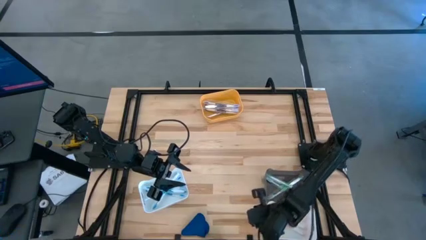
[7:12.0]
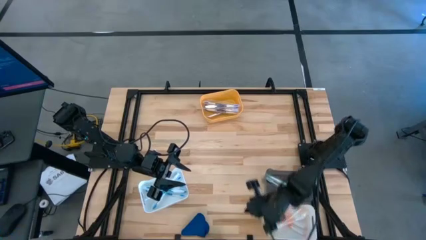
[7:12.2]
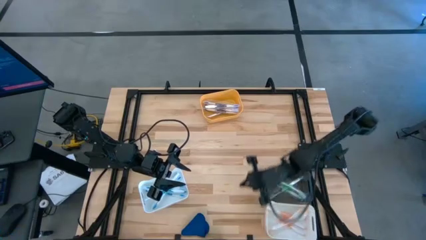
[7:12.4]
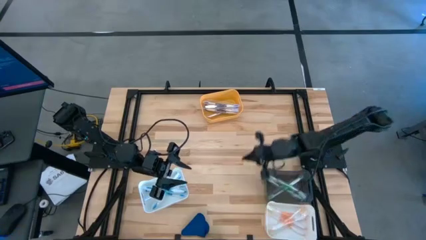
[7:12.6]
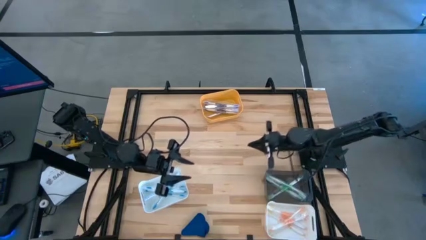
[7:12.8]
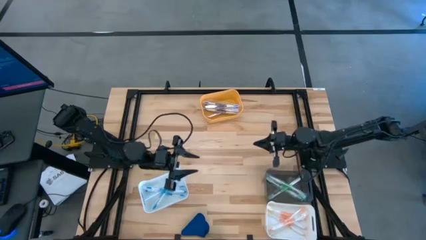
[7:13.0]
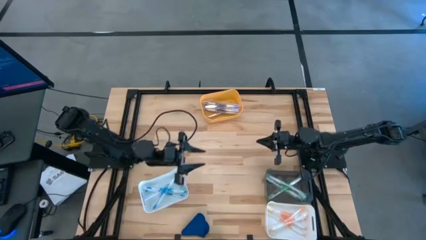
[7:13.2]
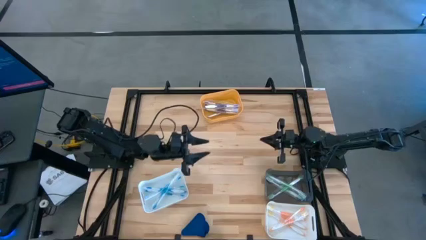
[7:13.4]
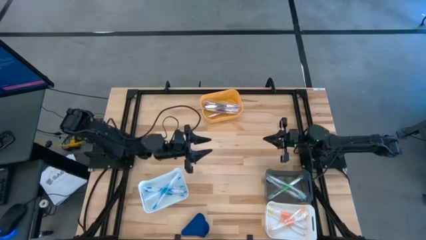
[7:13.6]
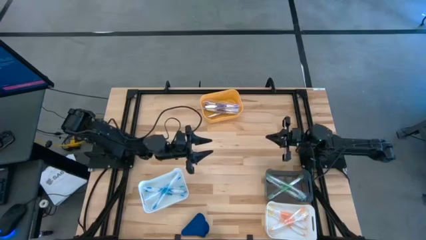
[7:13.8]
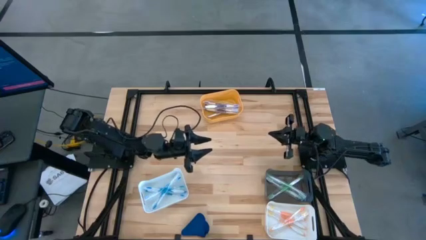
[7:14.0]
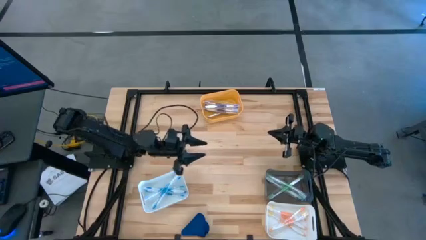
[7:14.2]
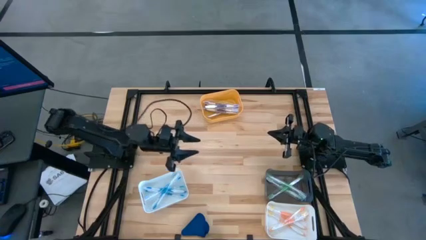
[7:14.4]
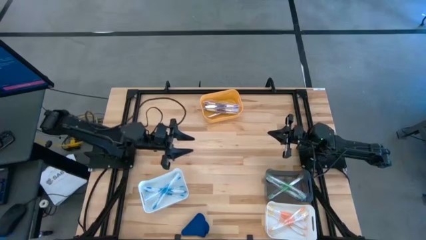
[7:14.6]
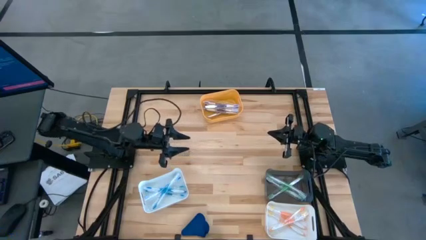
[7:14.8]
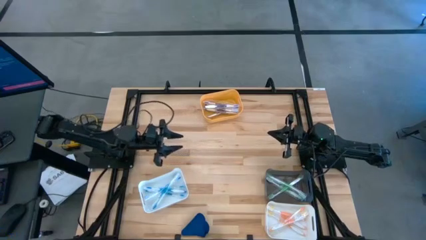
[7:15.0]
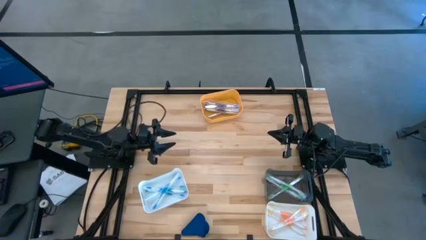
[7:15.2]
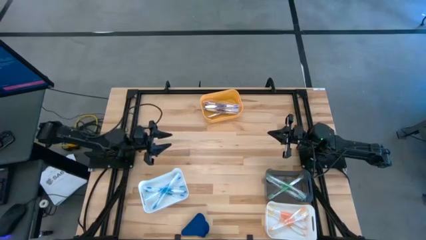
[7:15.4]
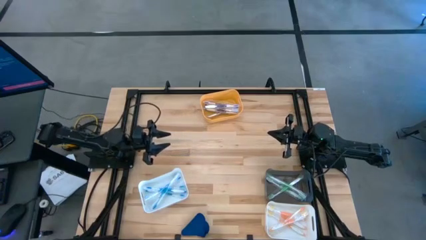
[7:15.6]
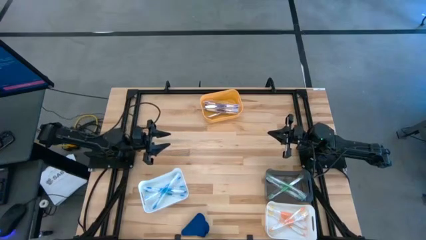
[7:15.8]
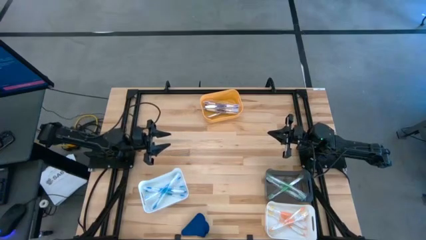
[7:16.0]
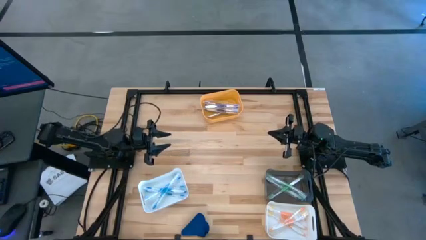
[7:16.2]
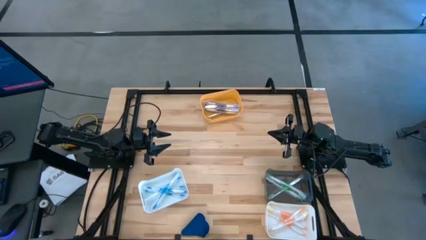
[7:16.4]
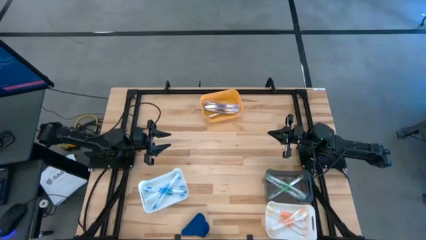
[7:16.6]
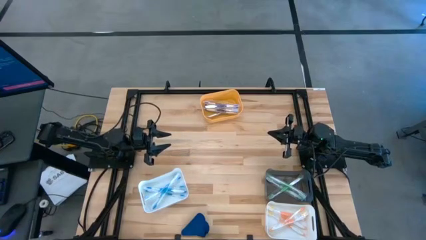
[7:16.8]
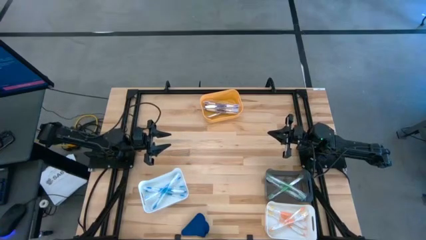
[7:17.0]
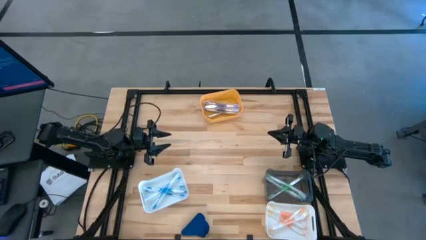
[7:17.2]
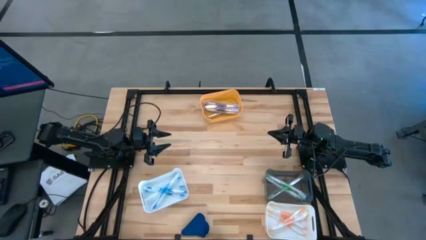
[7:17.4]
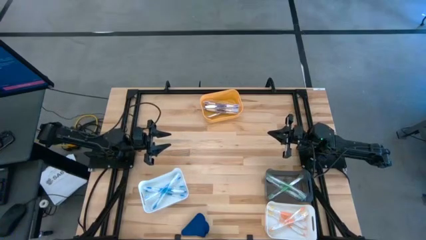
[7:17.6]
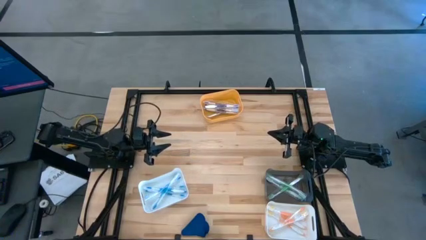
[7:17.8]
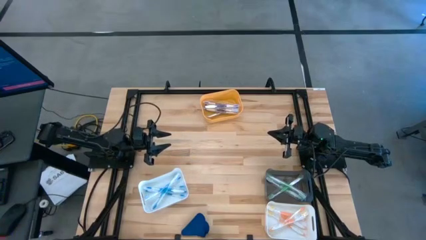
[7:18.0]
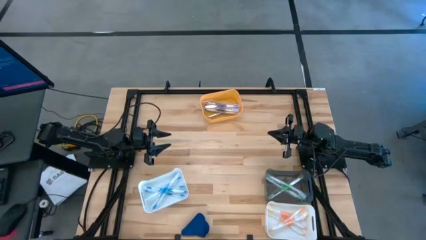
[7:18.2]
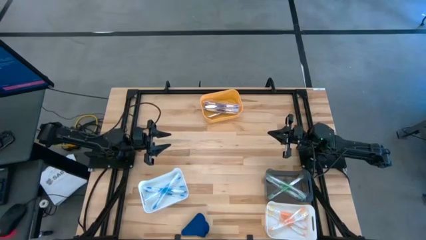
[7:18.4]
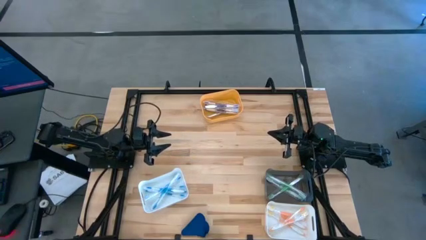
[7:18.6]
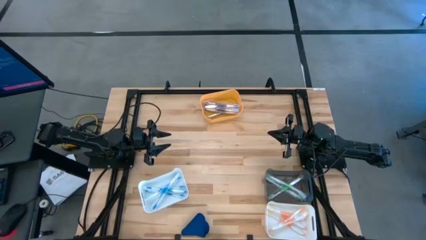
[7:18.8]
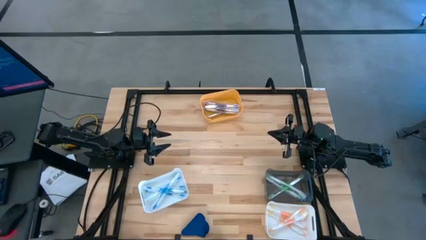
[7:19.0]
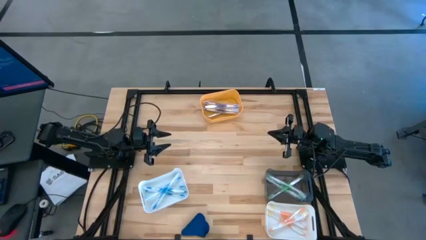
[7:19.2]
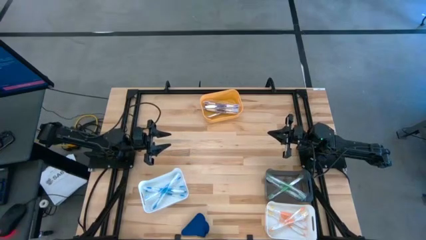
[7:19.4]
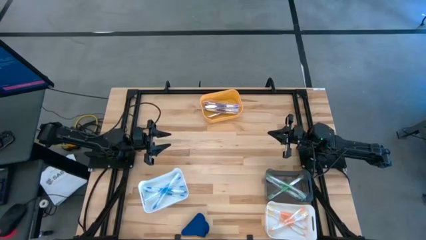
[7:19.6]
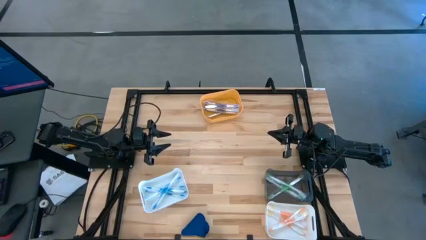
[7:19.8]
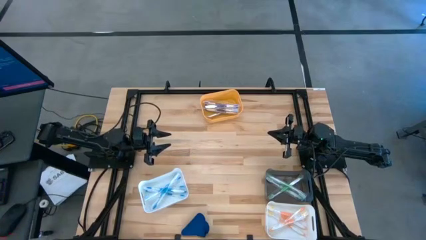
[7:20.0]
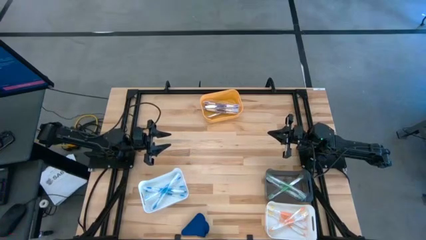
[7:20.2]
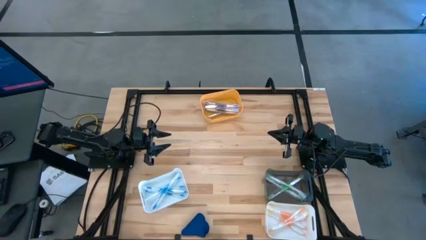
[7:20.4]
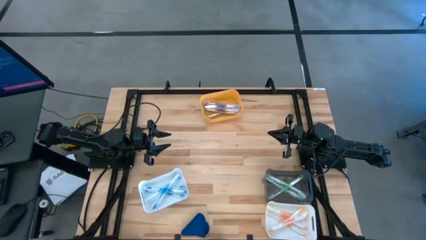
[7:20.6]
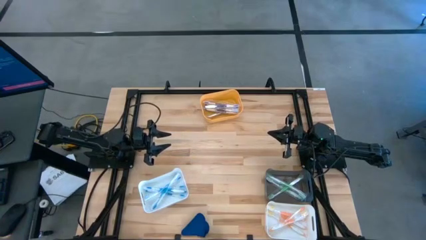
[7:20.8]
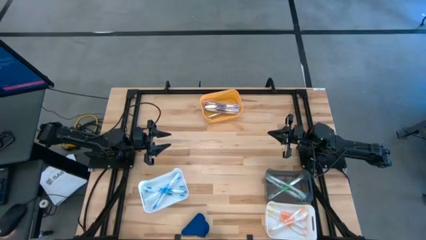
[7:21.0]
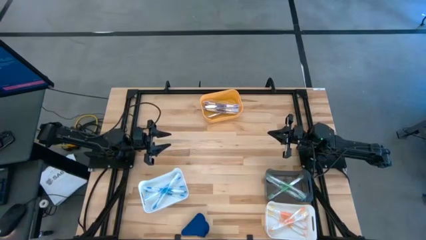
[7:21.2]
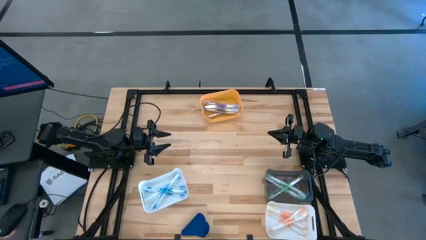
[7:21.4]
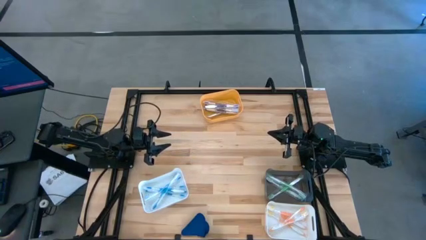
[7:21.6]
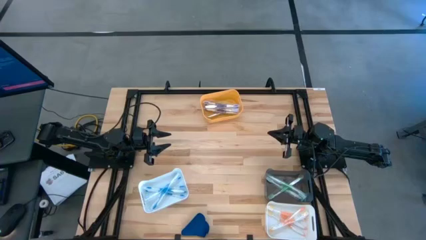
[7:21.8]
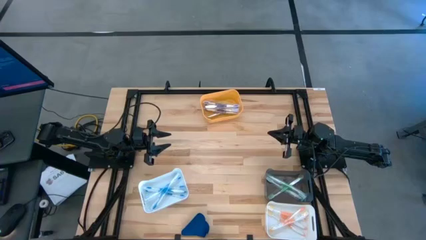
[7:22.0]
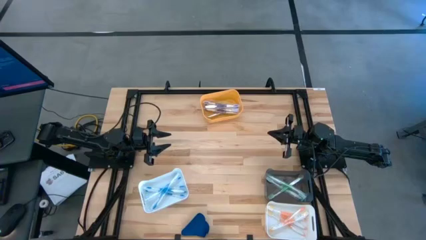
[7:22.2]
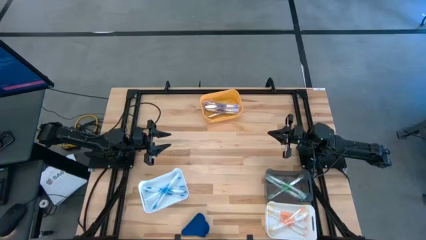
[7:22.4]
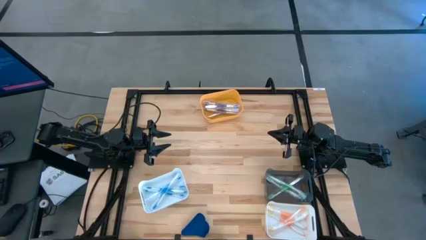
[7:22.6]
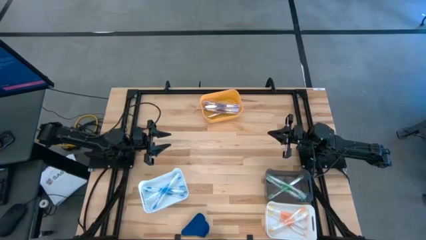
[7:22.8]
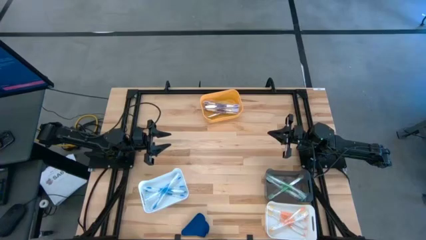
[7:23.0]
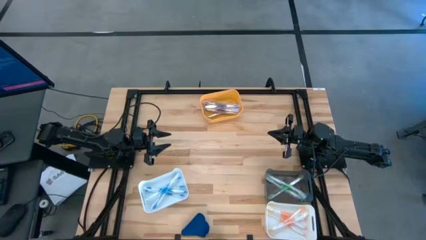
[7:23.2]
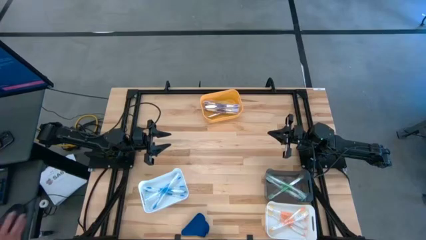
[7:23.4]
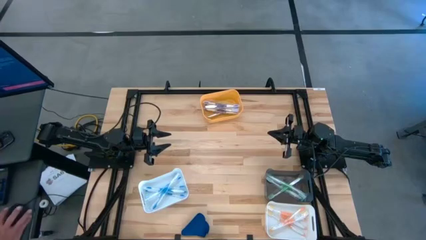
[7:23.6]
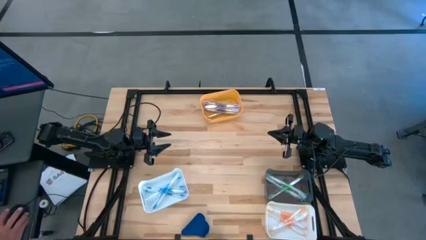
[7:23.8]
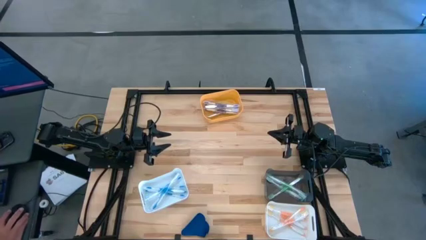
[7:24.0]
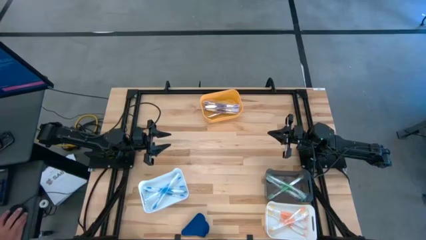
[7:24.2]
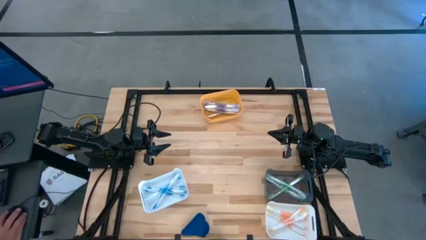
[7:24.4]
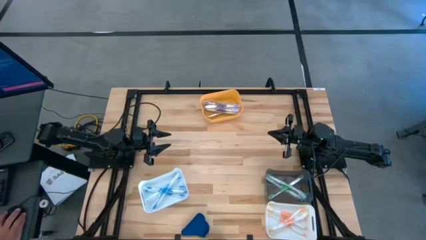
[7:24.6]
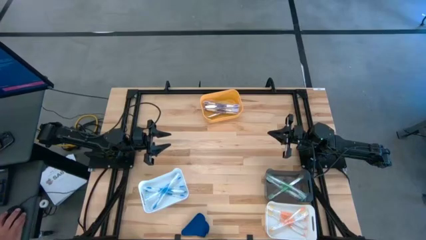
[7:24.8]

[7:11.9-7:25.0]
Task: Pick & Place Toothbrushes
Return to Home Position

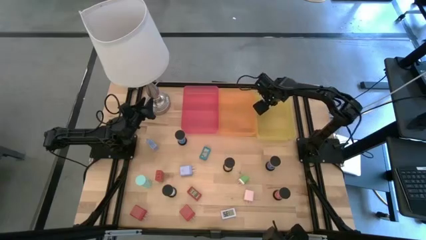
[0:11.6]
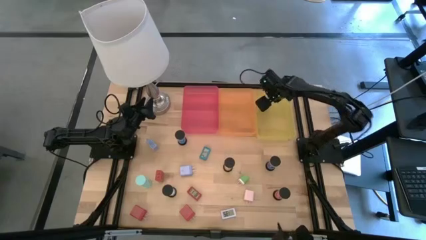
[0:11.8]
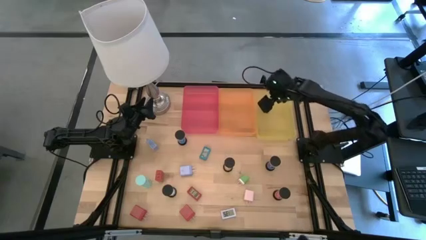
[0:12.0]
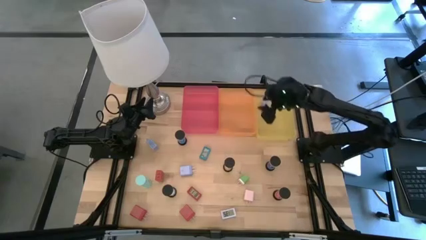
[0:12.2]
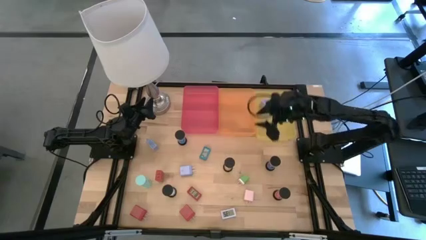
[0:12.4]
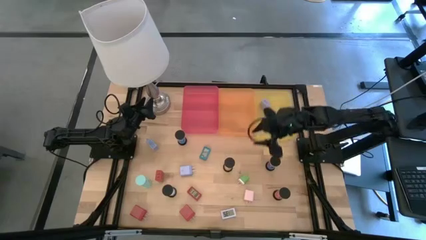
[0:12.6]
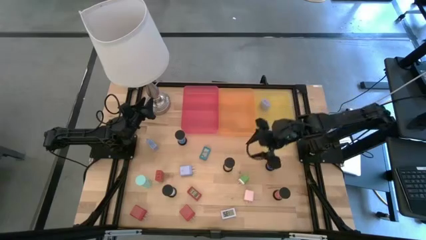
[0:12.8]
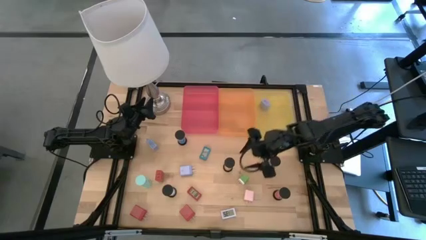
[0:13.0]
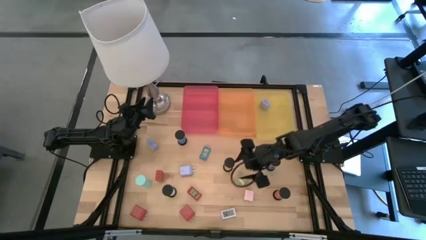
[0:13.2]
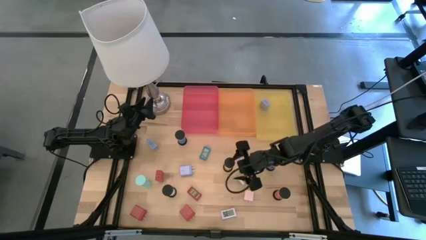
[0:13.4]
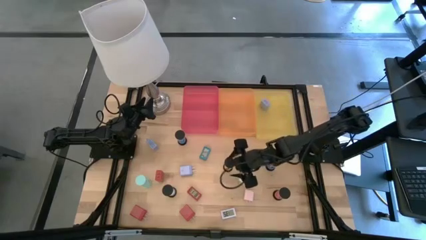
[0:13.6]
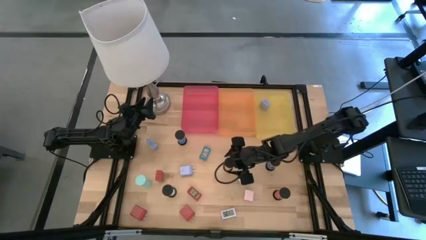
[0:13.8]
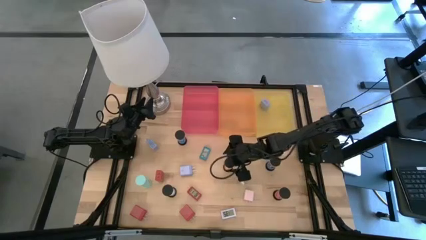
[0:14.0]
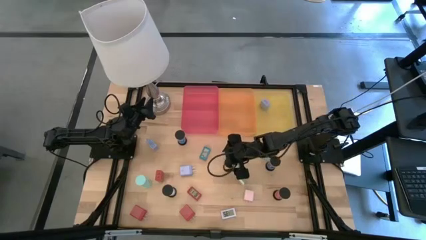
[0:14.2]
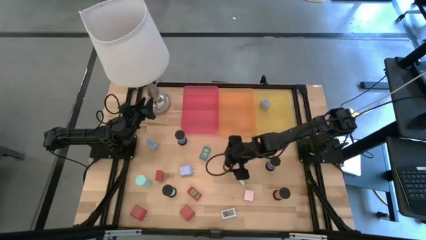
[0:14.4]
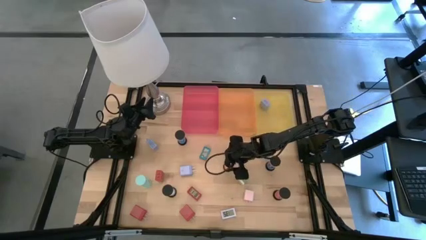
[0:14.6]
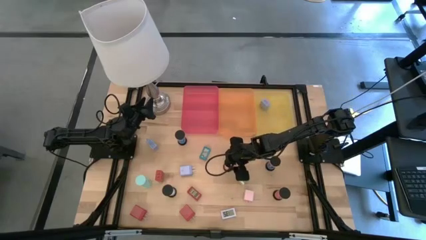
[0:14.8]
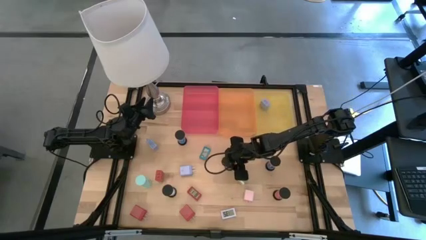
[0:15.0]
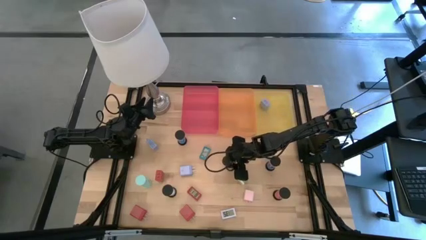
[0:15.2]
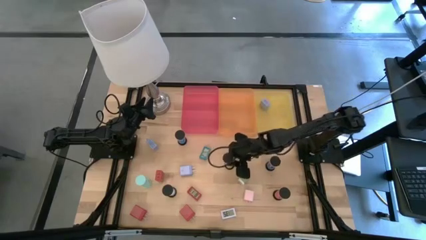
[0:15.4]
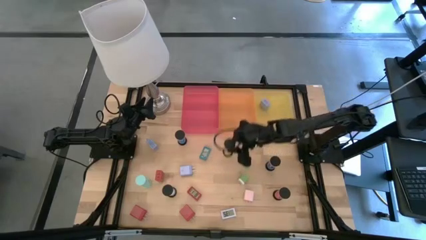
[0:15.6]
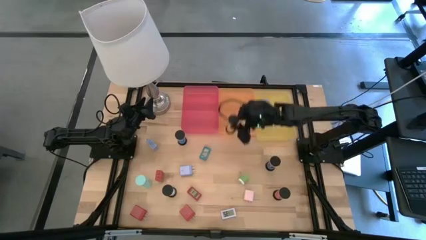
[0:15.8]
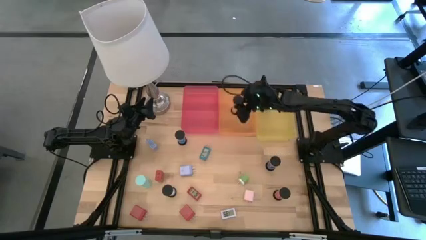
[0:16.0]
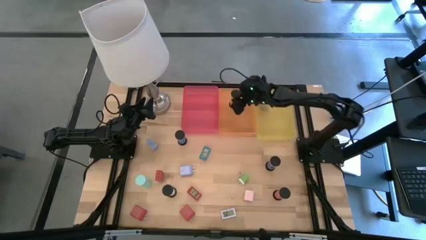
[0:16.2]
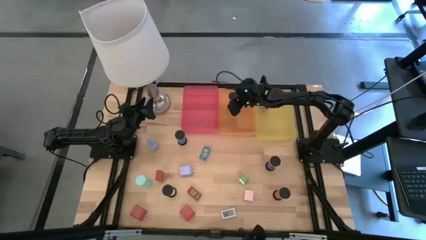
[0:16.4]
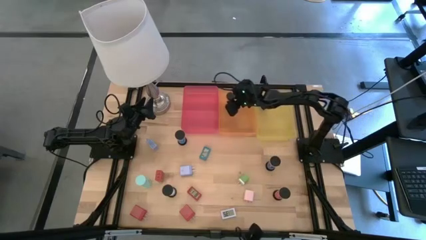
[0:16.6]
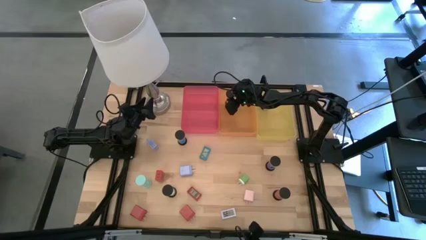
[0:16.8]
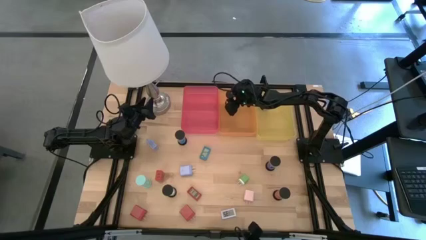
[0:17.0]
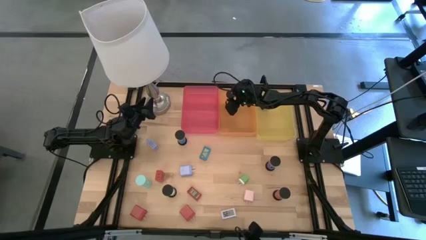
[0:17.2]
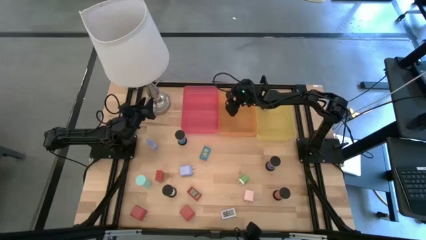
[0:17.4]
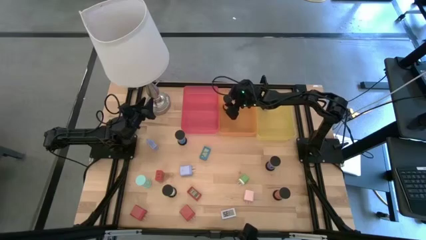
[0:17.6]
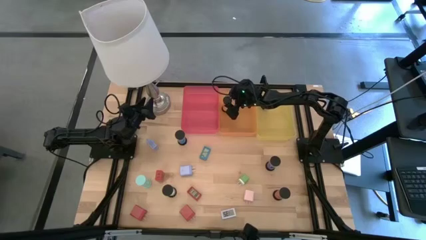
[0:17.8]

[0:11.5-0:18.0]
Task: Pick & Place Office items
Put the orange hourglass into the orange bin
